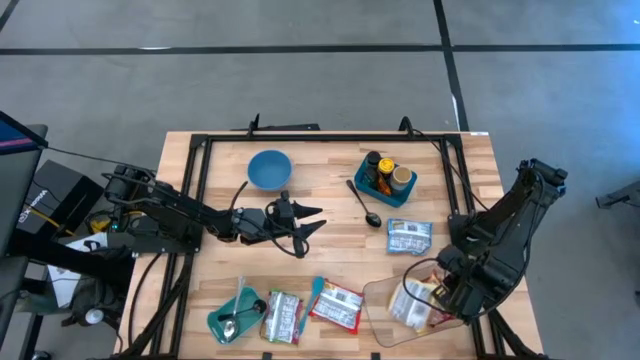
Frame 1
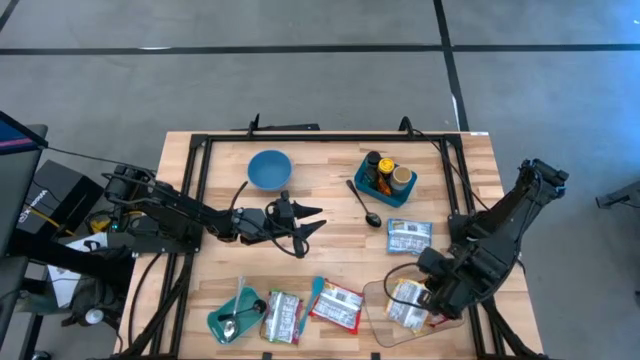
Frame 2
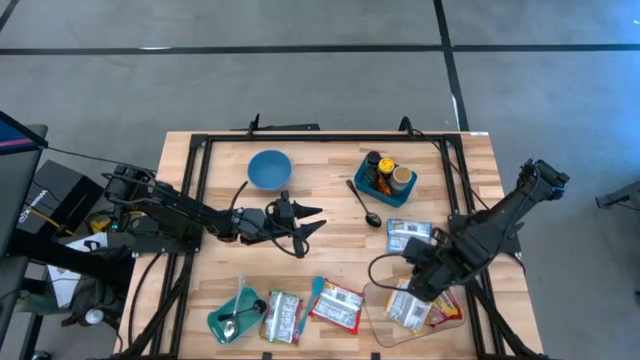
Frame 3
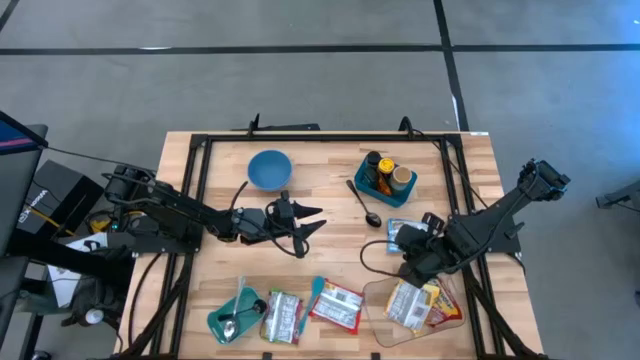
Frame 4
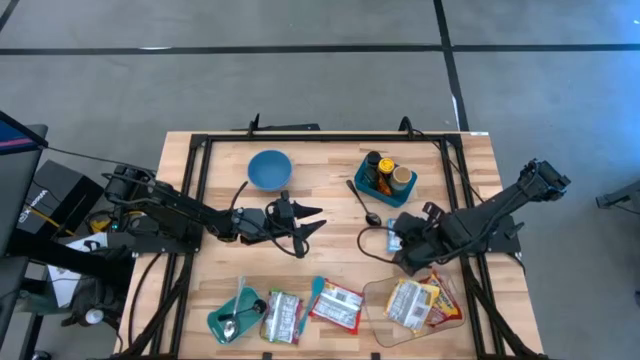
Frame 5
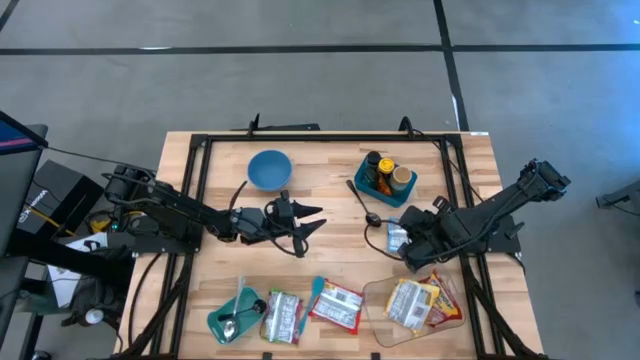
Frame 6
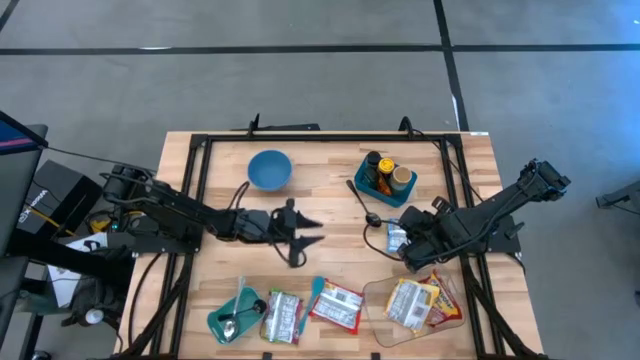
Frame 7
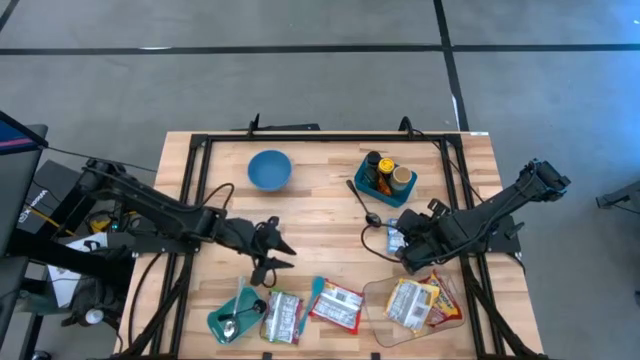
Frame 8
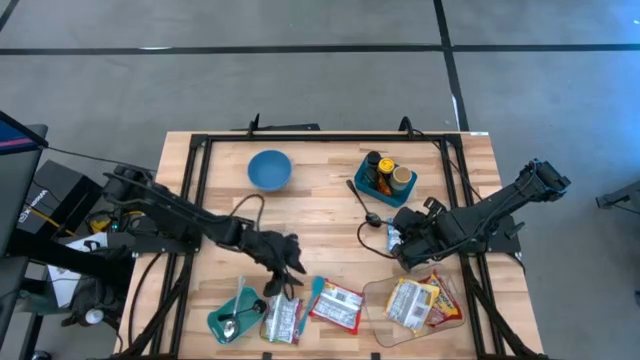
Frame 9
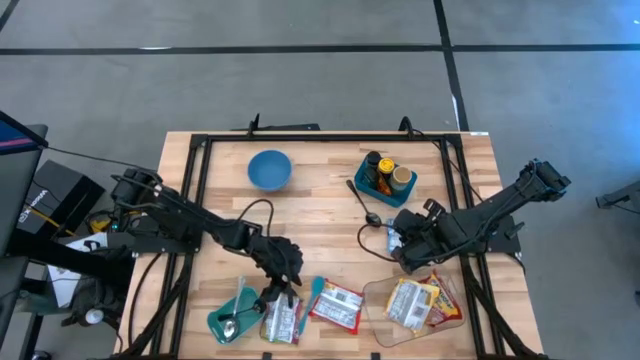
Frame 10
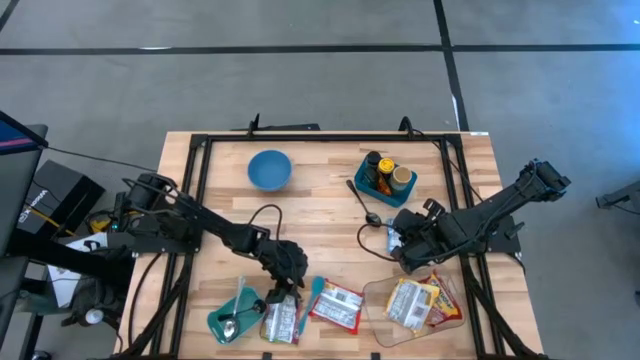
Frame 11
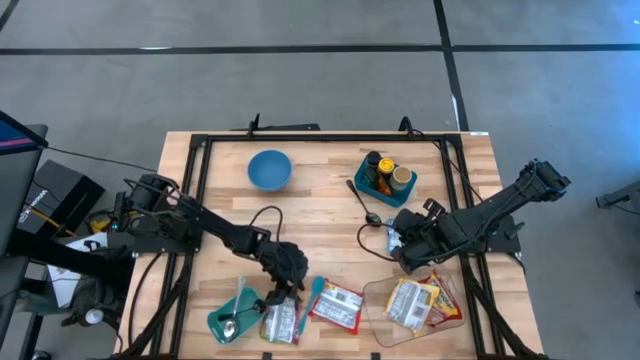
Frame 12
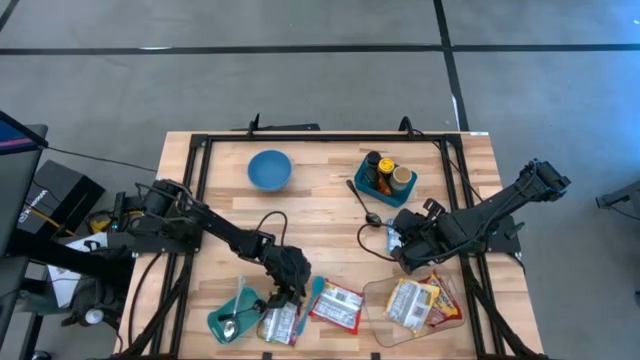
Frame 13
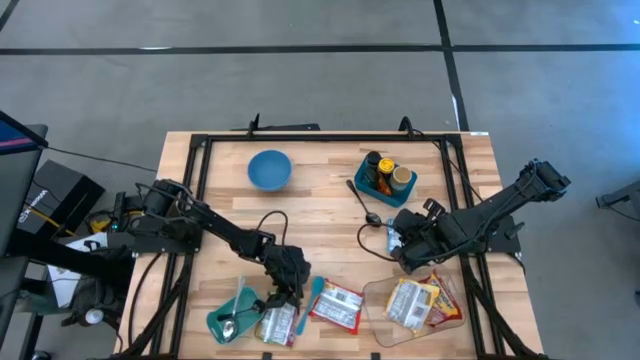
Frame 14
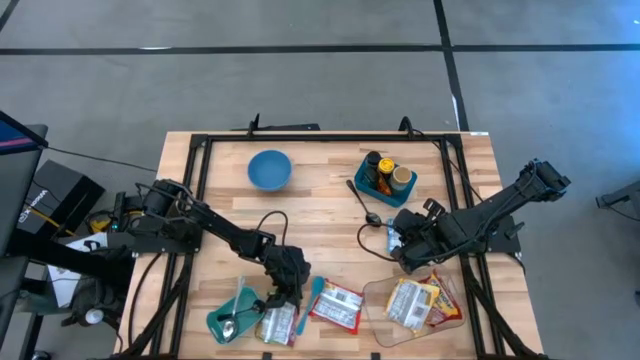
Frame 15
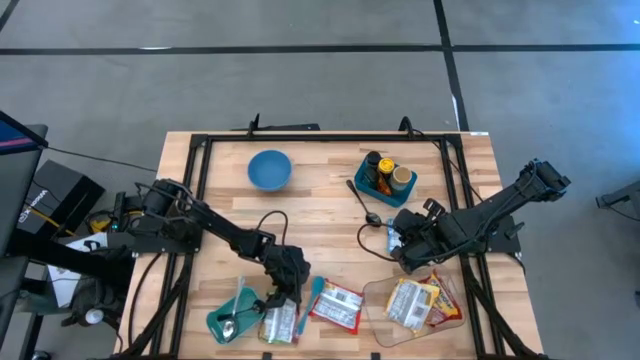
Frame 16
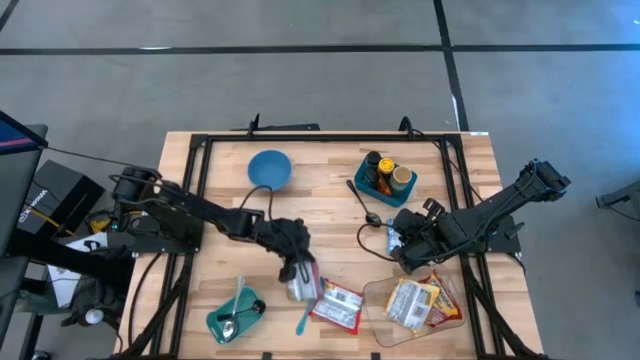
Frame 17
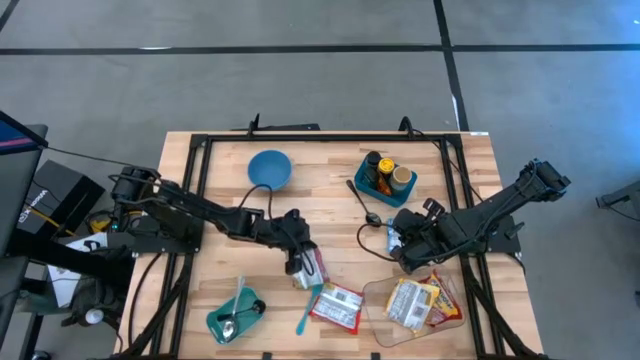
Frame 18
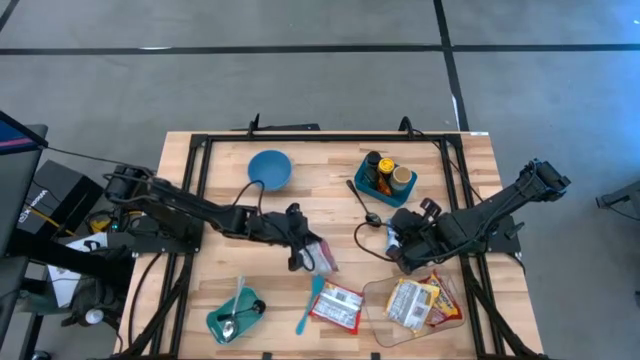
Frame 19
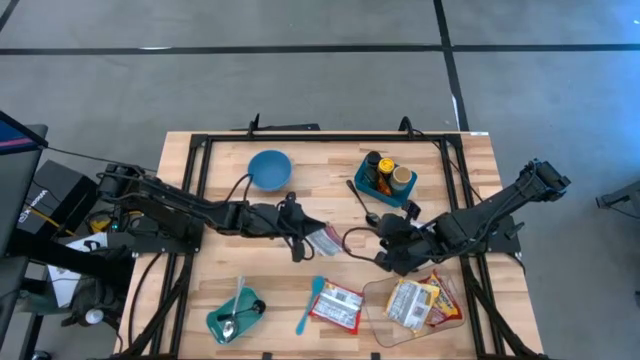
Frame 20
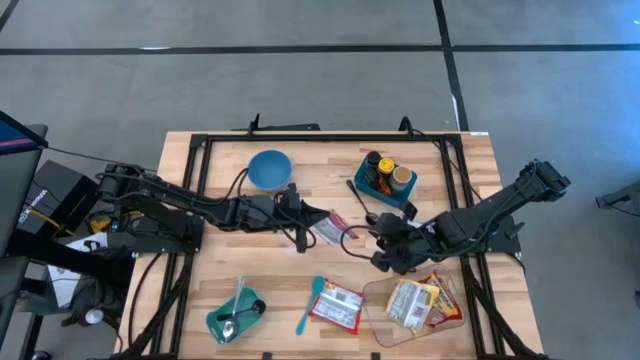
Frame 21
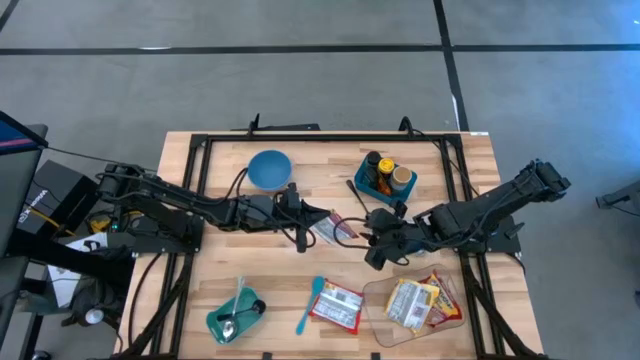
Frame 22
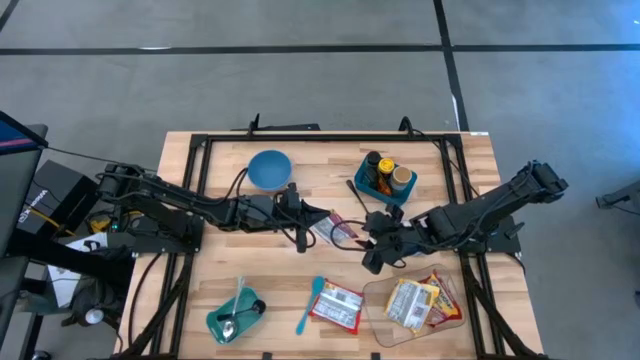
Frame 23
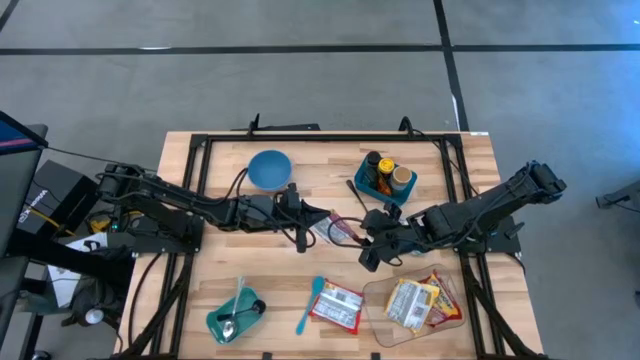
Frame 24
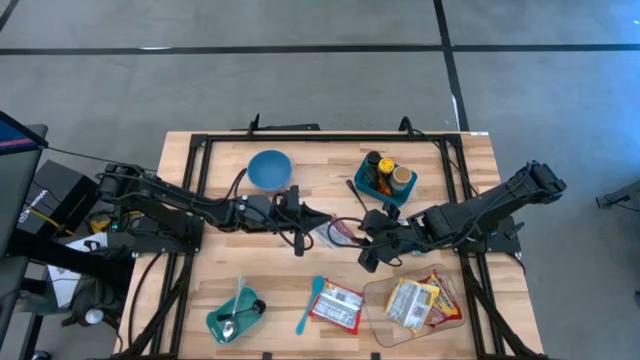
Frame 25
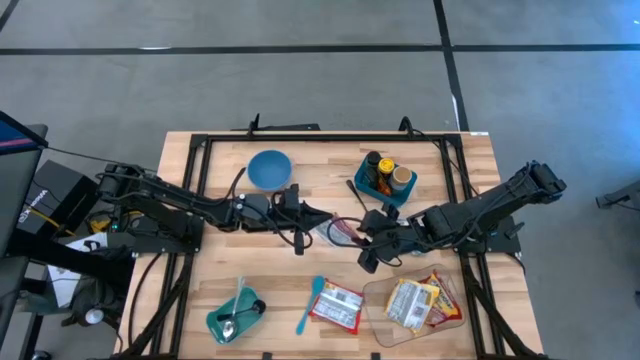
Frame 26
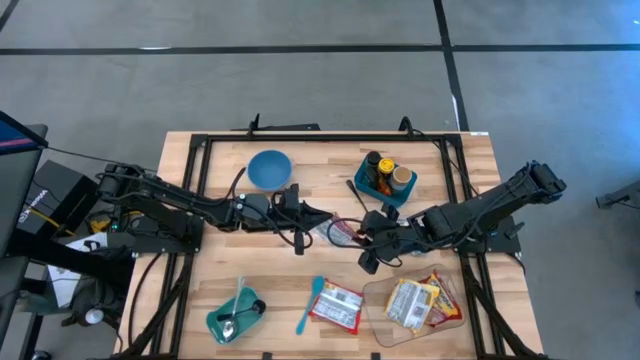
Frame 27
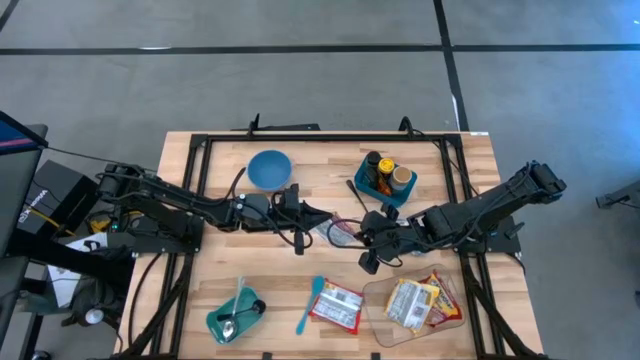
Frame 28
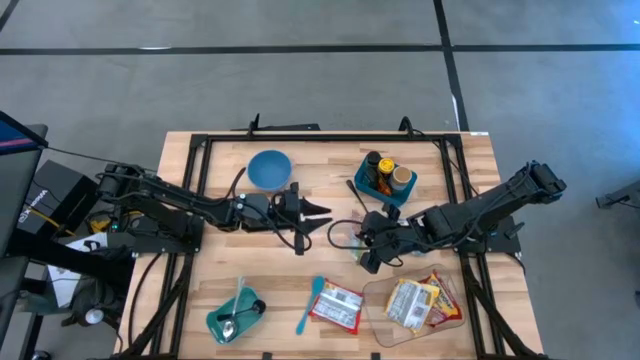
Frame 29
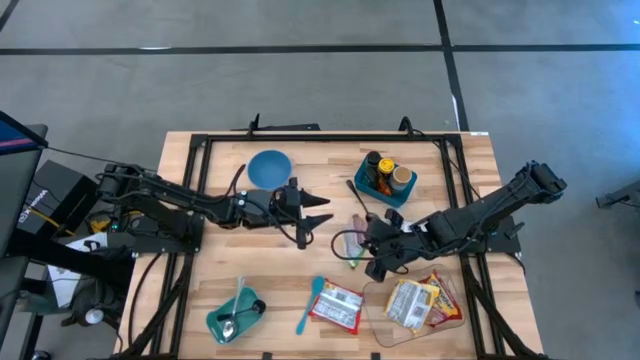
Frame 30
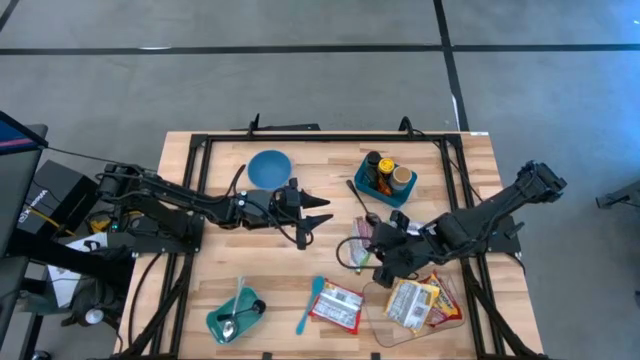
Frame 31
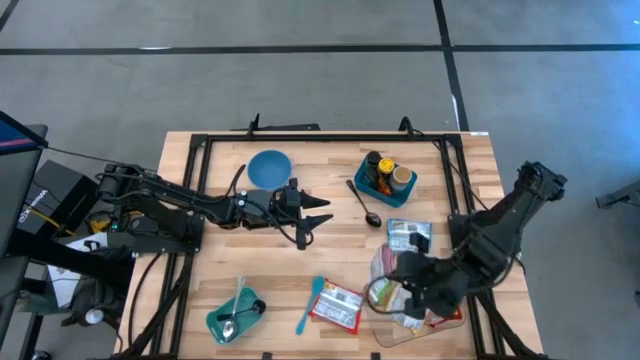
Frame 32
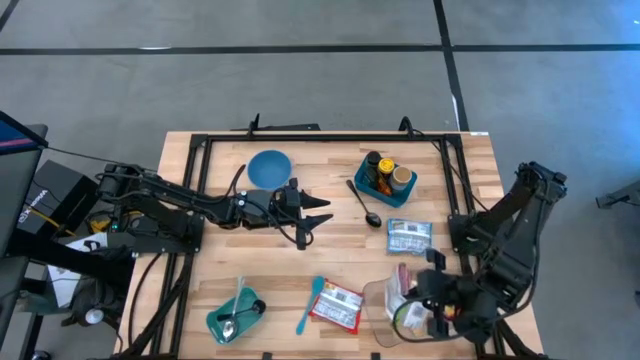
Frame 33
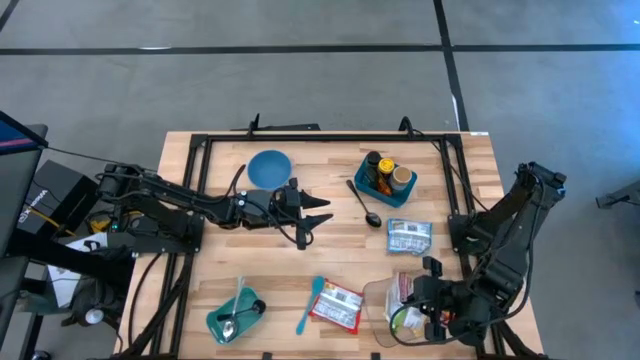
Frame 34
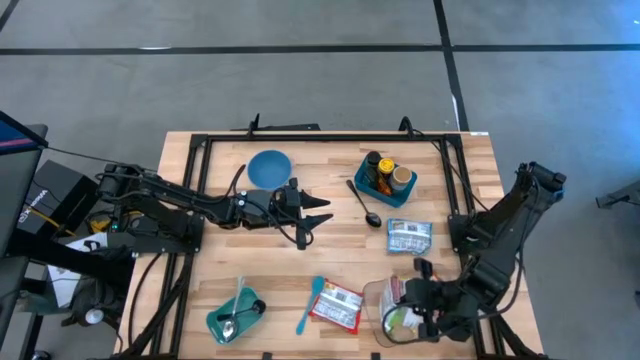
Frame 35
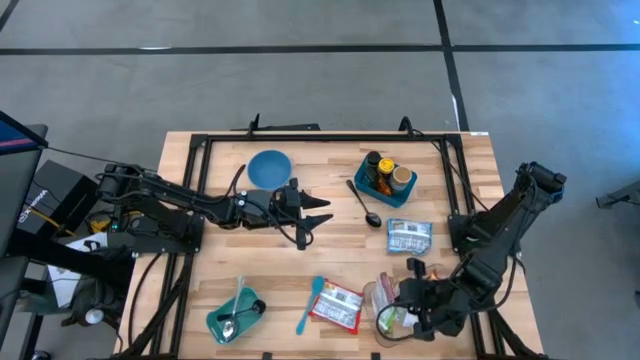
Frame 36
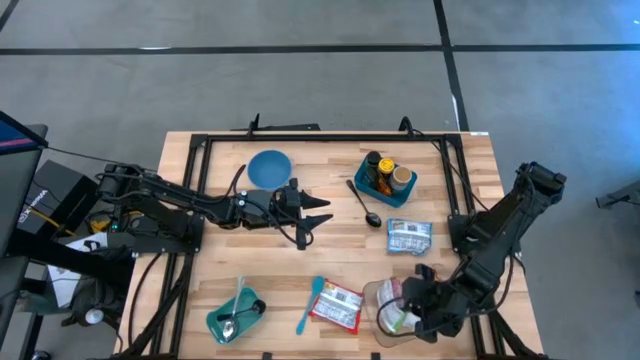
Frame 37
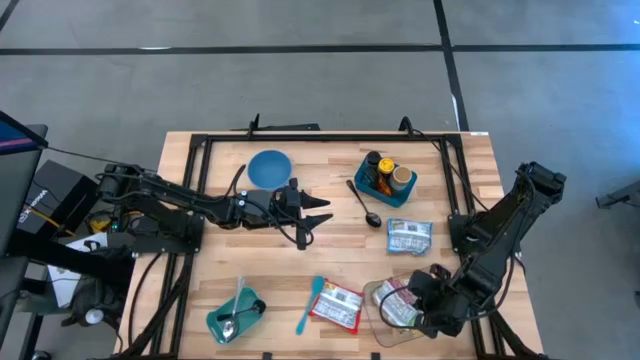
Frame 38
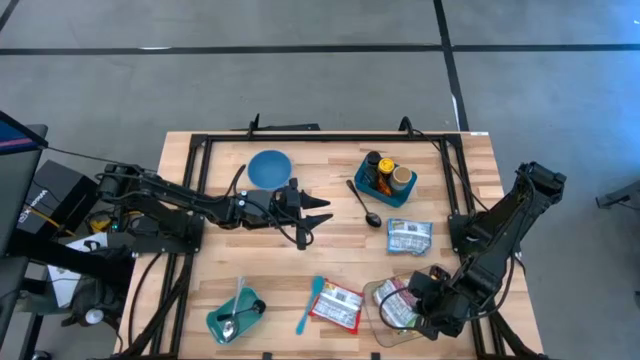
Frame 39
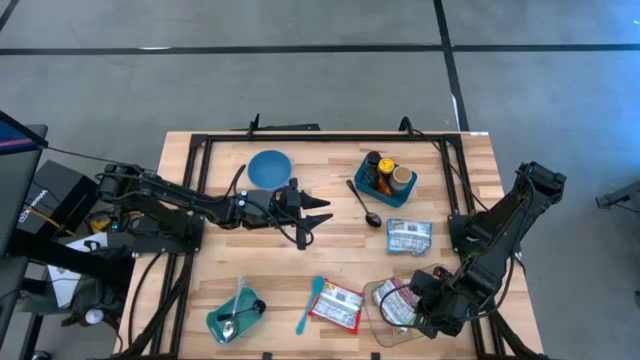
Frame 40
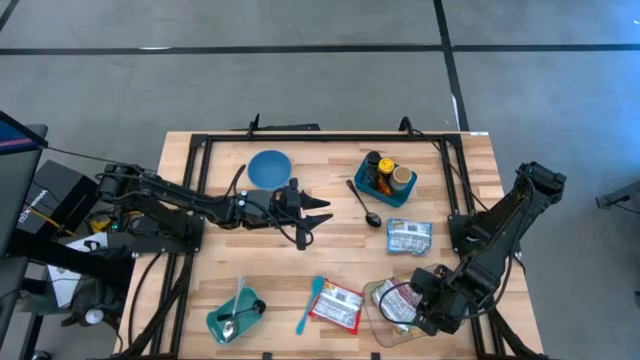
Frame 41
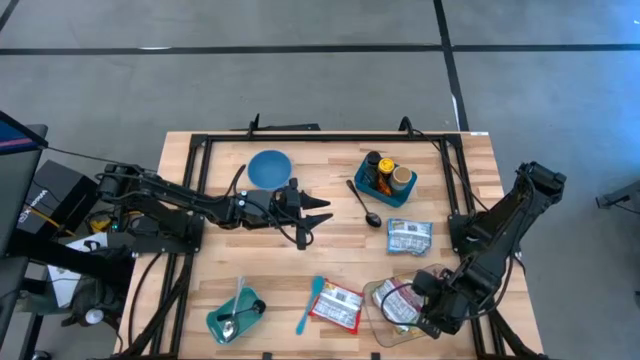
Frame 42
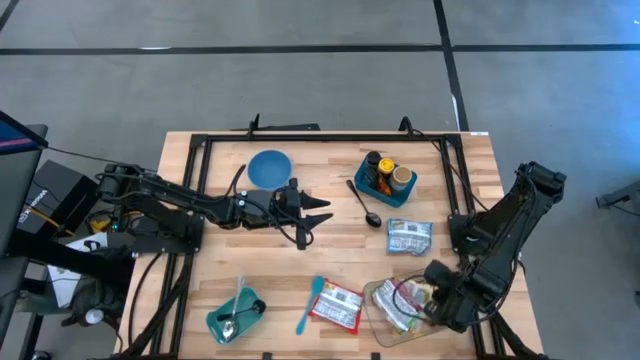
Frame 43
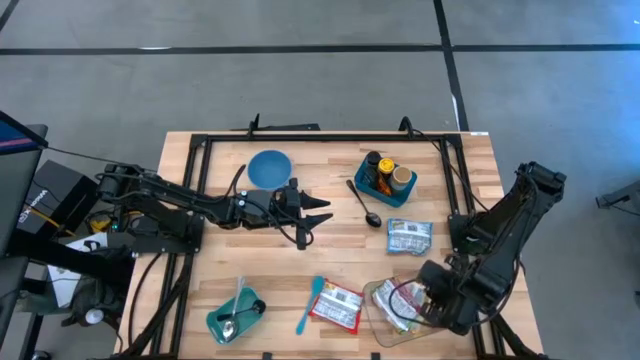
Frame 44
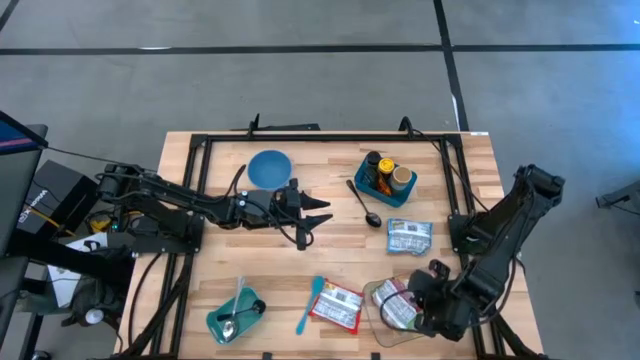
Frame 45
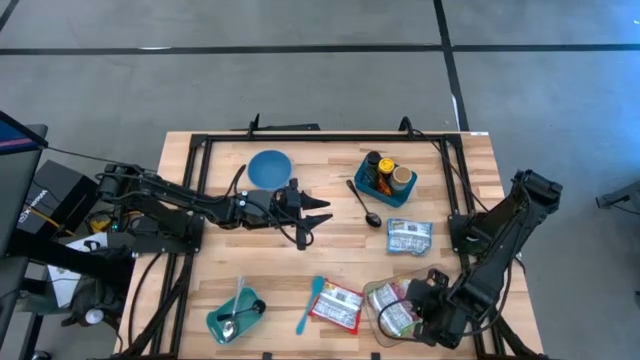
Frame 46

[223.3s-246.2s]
Task: Pick & Place Food Item
Put the pink green noodle pack into the transparent bin
